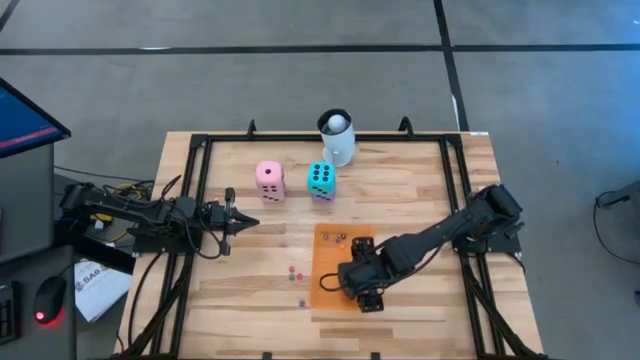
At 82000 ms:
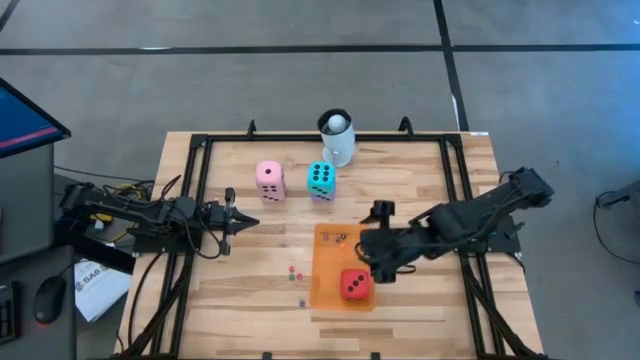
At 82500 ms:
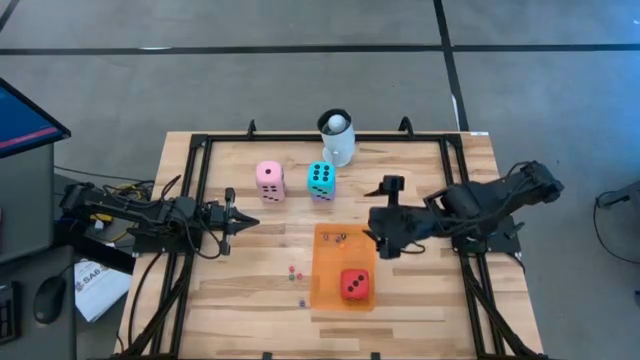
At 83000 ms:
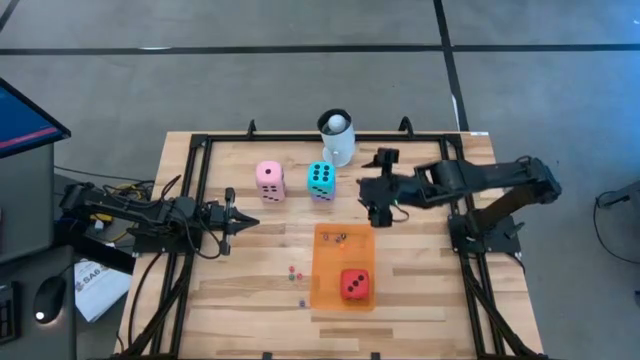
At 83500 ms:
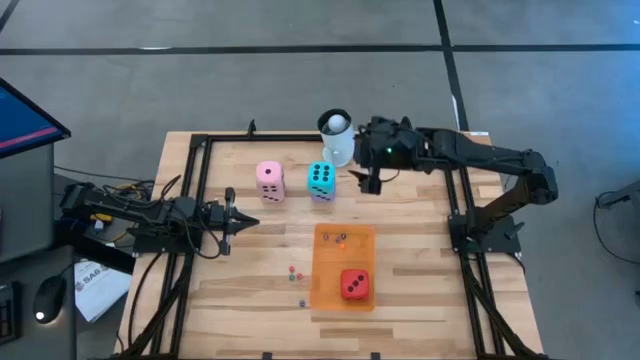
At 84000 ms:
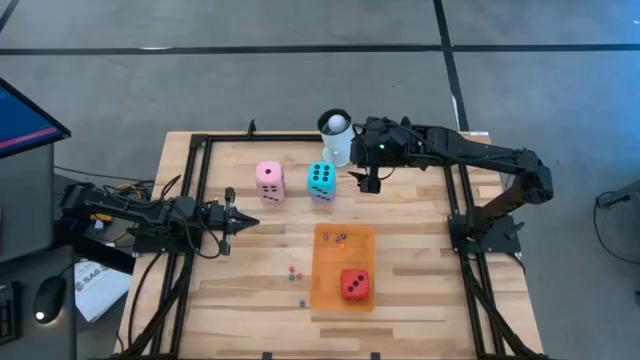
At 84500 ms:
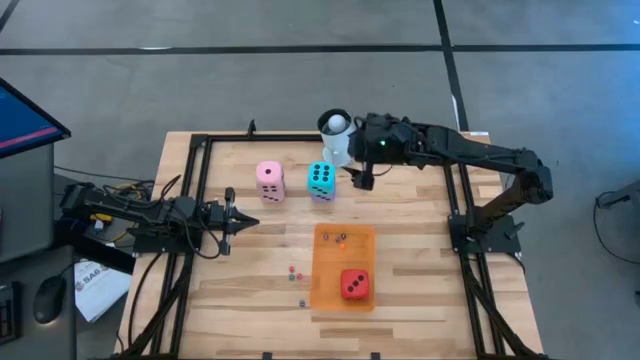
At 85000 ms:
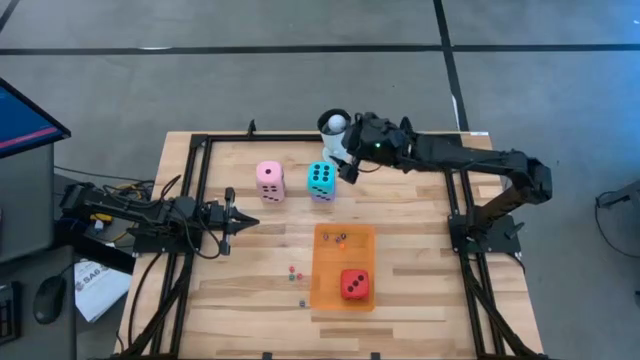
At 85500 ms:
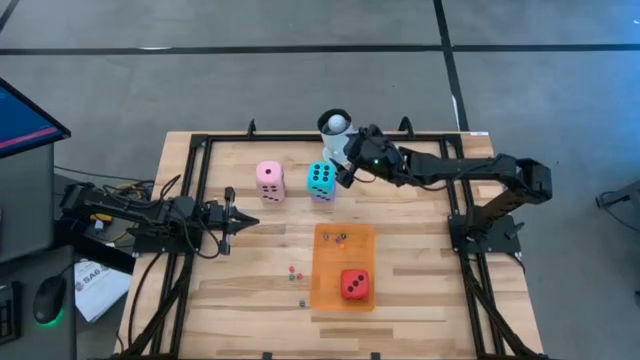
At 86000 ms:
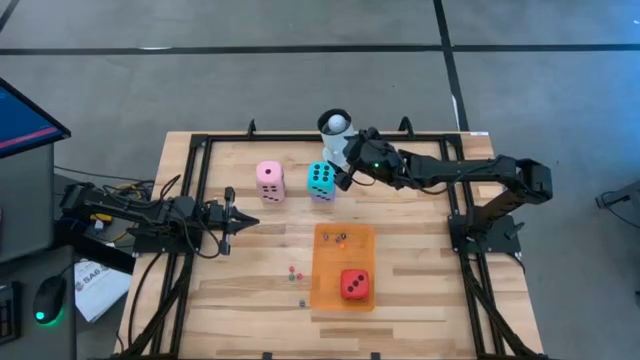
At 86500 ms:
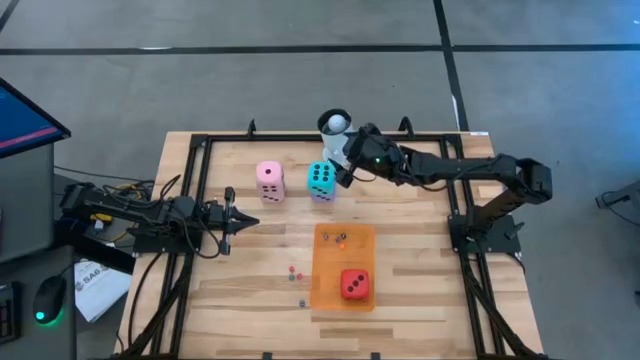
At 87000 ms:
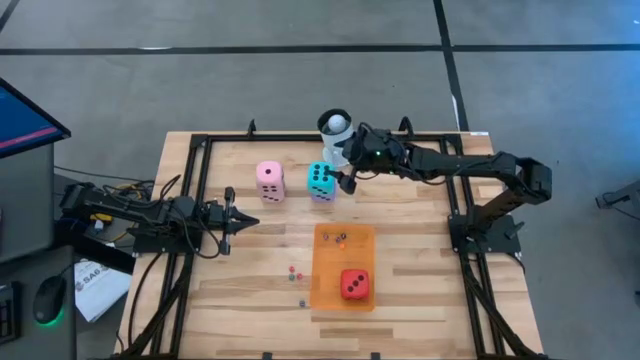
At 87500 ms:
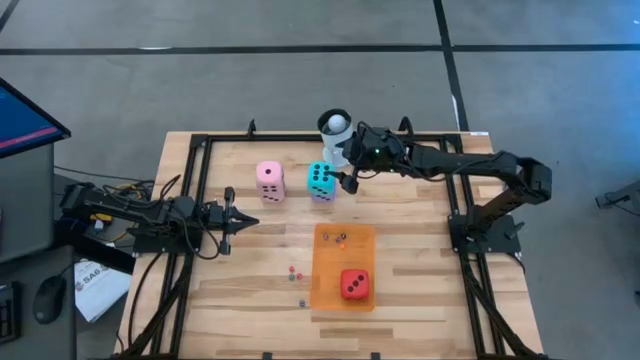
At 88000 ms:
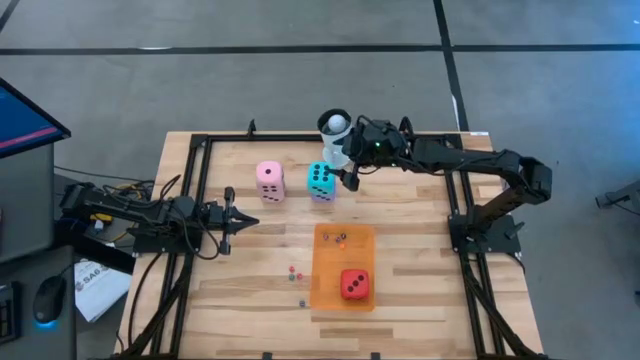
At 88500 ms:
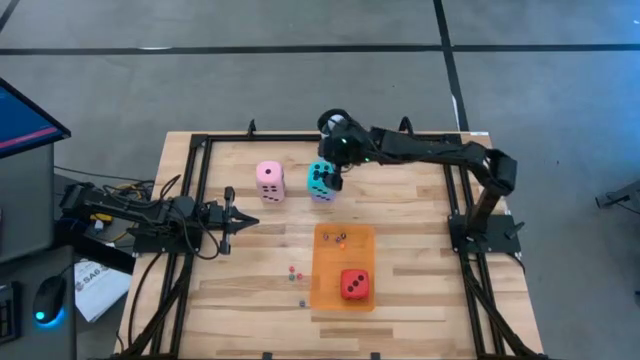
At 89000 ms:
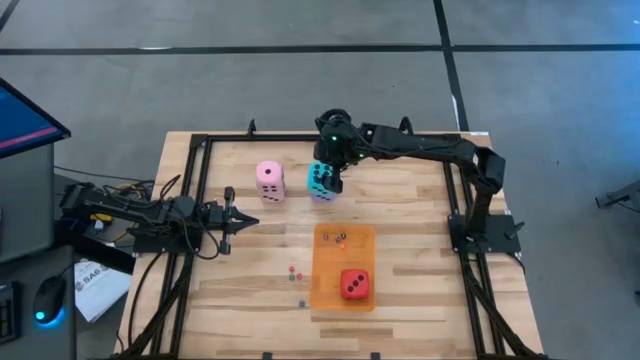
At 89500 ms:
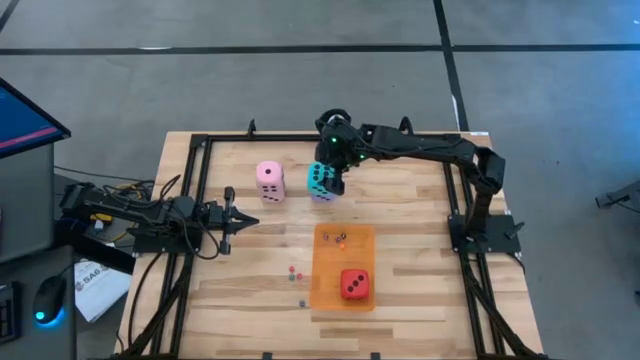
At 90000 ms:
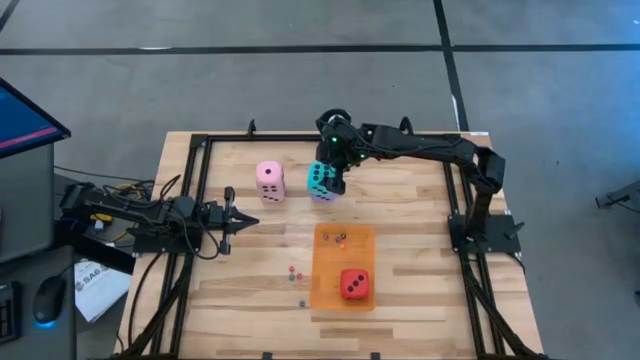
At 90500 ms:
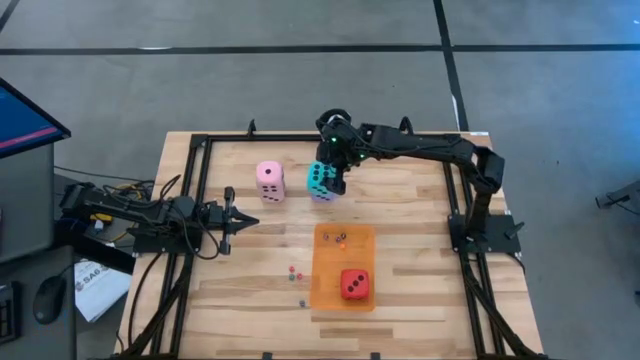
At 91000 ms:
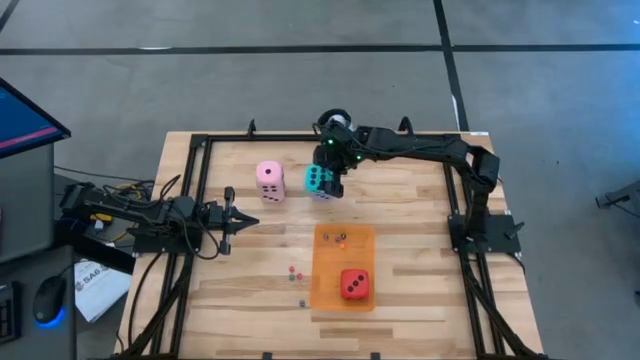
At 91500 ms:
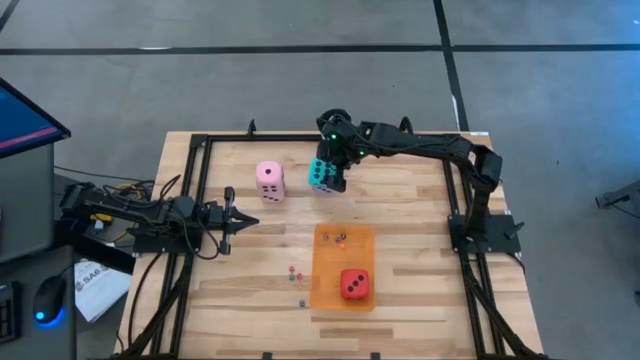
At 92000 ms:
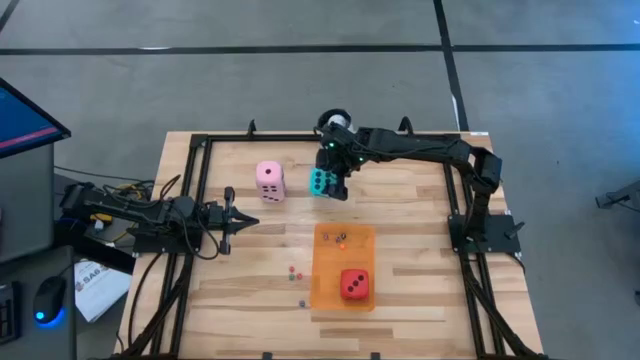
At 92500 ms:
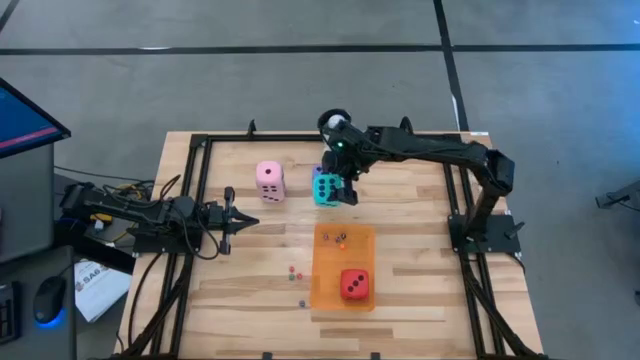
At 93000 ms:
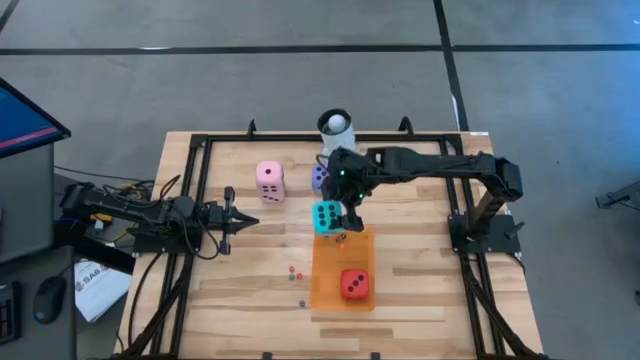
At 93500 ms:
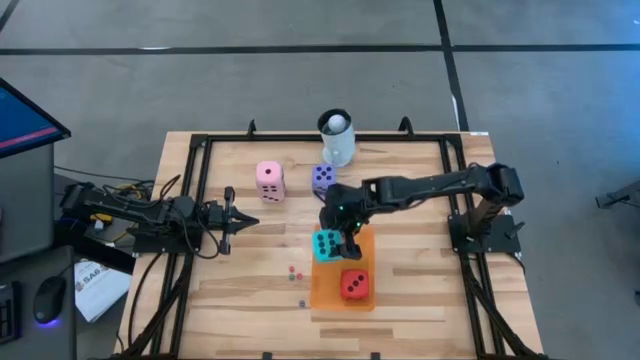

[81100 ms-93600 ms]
Task: Pick & Place Dice
Put the large blue dice into the orange bin

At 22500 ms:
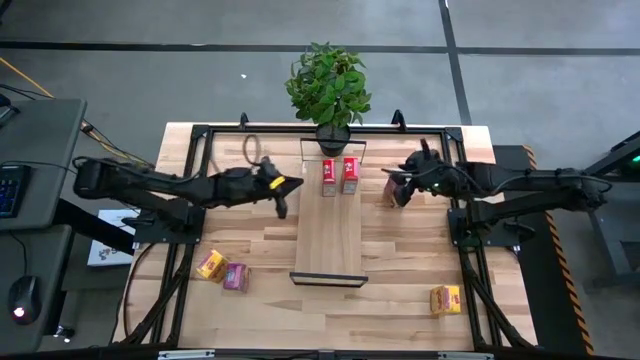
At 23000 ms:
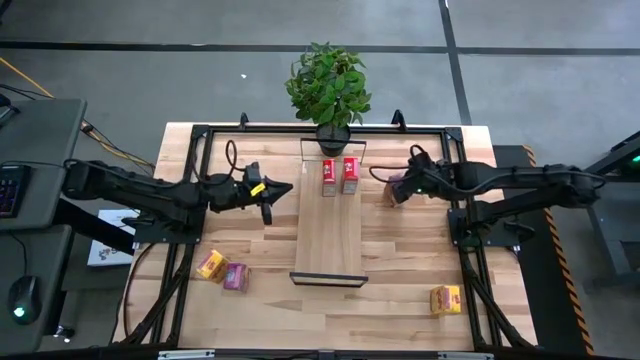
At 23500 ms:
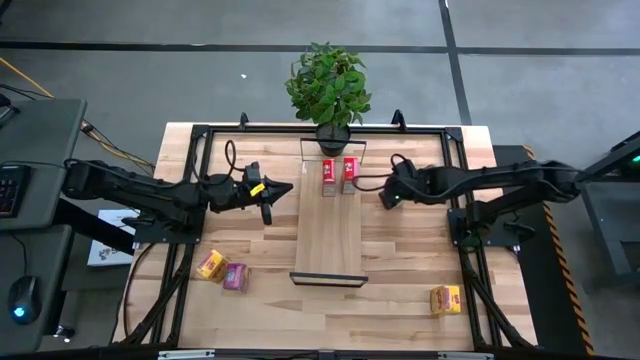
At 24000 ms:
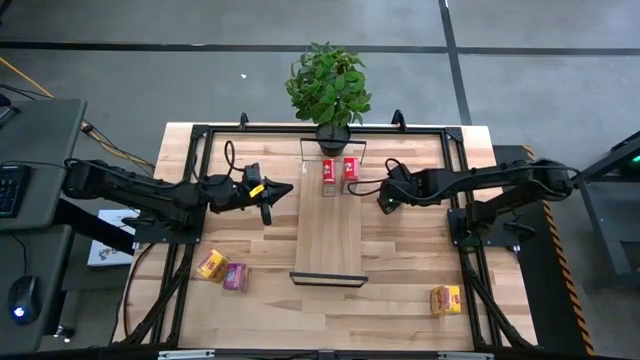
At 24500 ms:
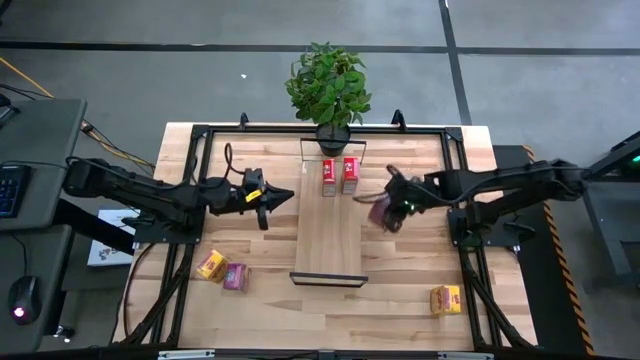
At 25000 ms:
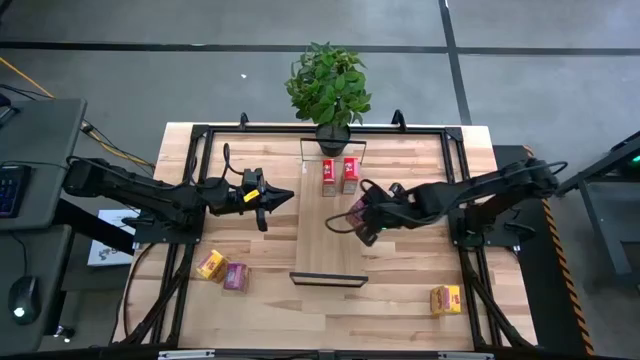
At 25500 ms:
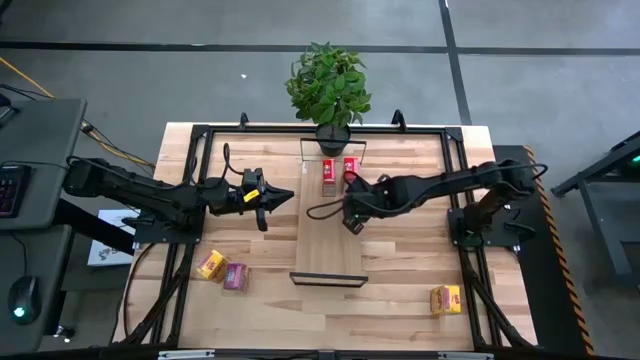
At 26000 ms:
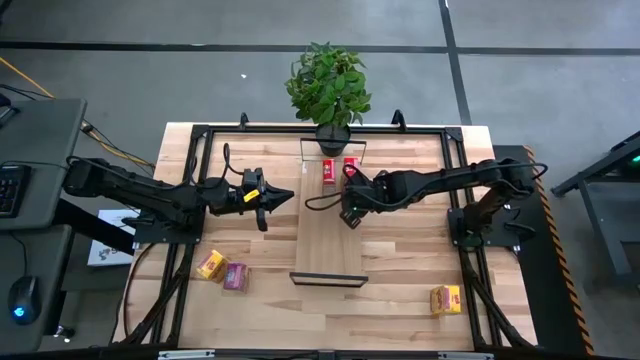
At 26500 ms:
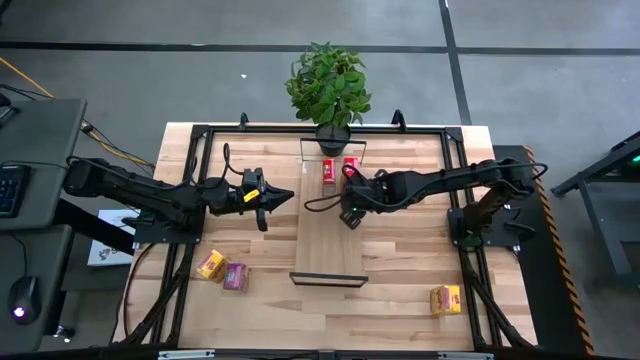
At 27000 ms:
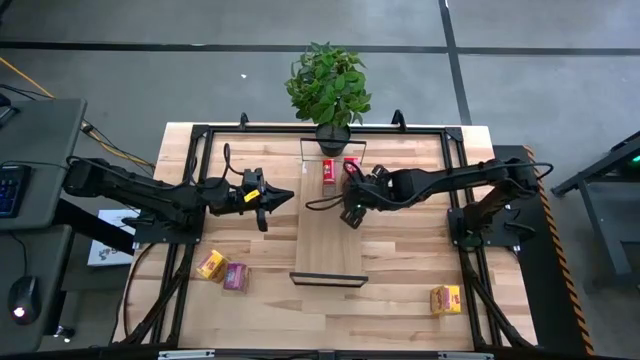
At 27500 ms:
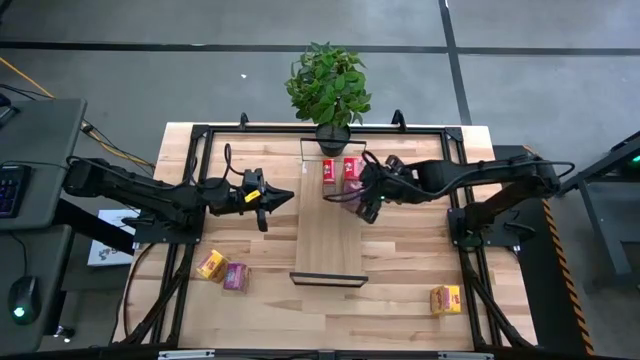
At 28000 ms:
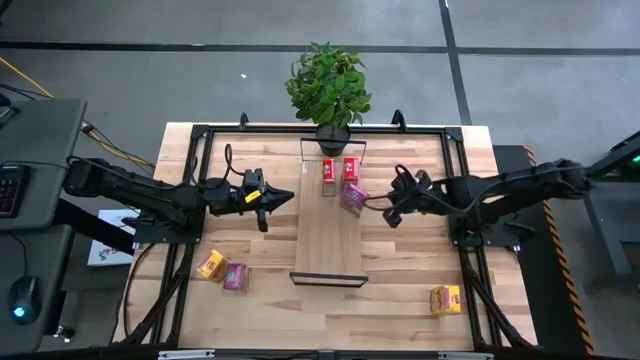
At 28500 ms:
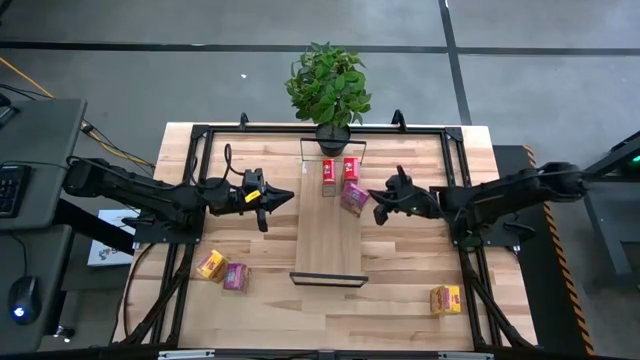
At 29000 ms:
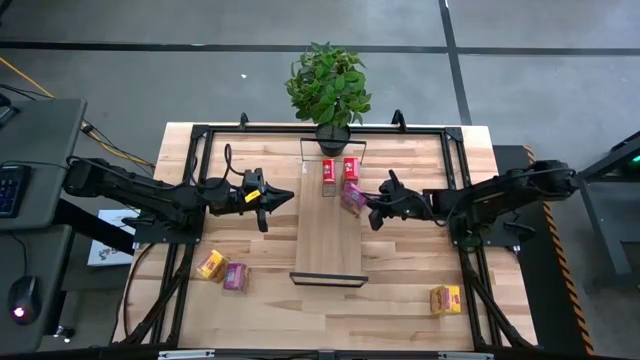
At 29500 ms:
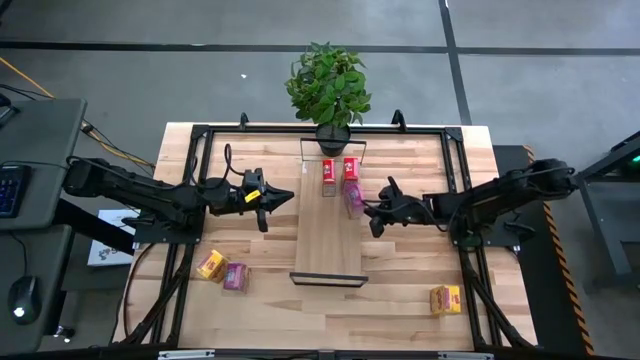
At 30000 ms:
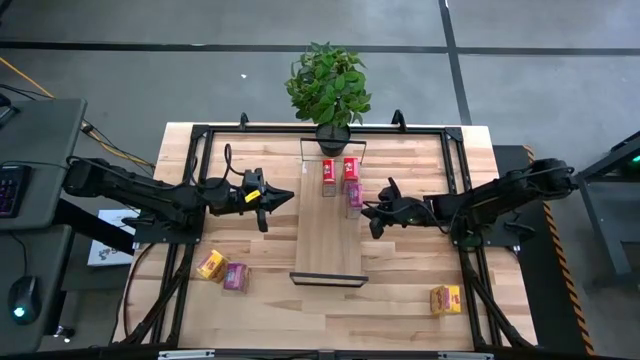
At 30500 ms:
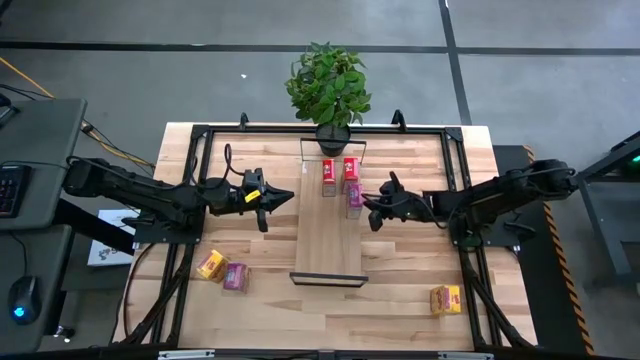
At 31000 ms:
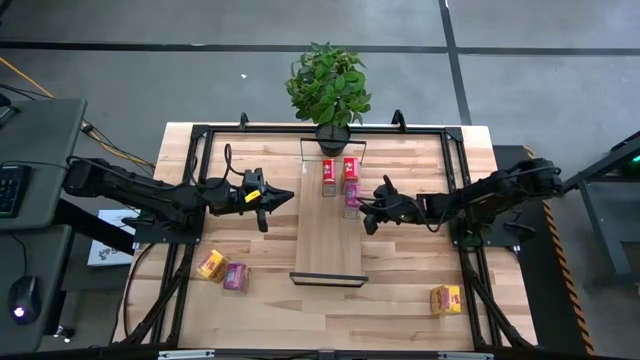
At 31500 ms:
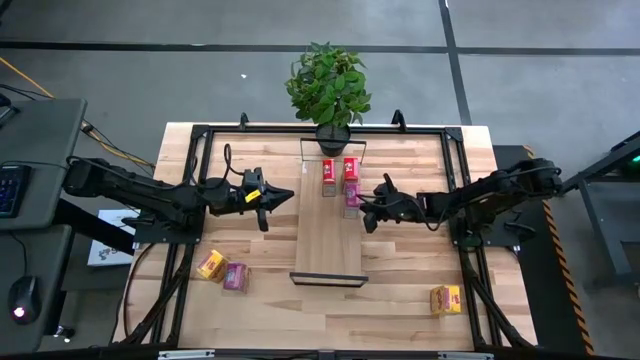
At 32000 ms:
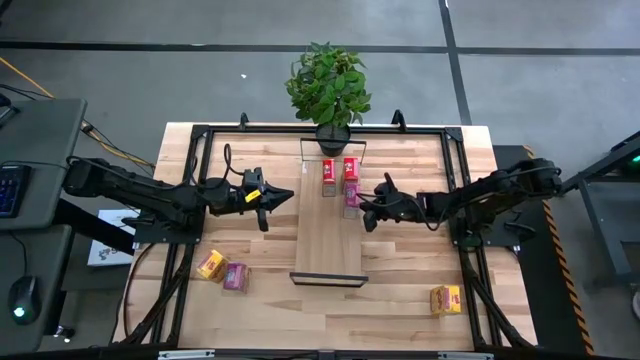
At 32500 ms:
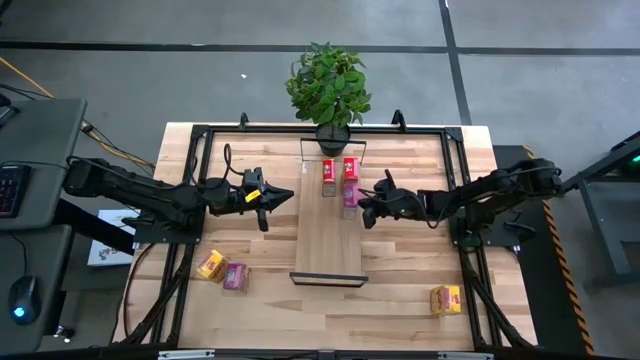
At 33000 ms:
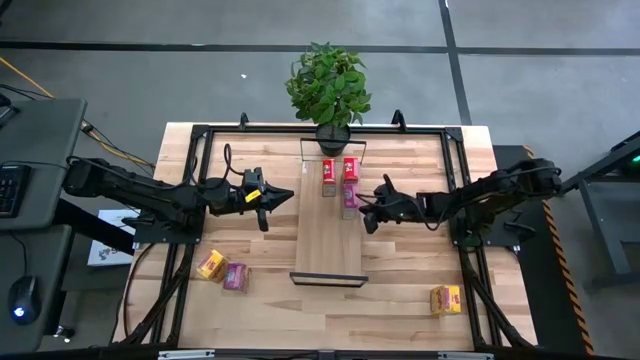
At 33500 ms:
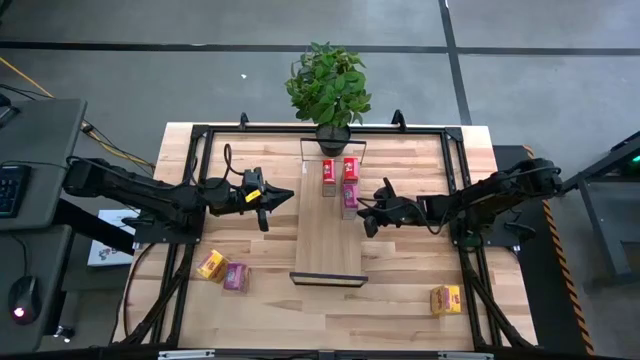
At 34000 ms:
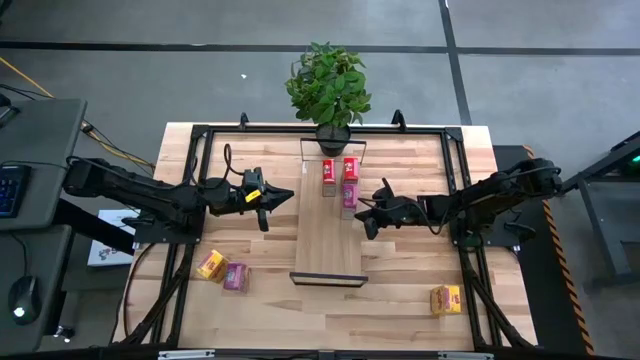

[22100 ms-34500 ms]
Task: Stack cereal on shelf
Put the right violet cereal box on the shelf
